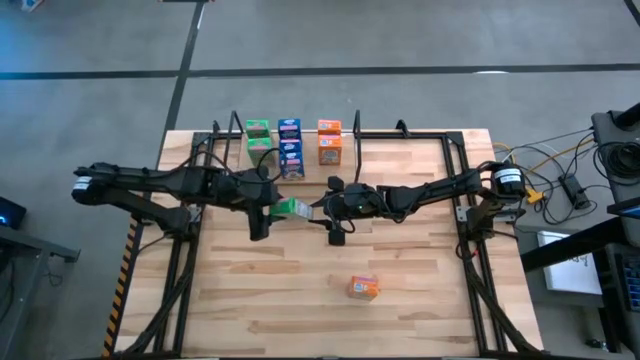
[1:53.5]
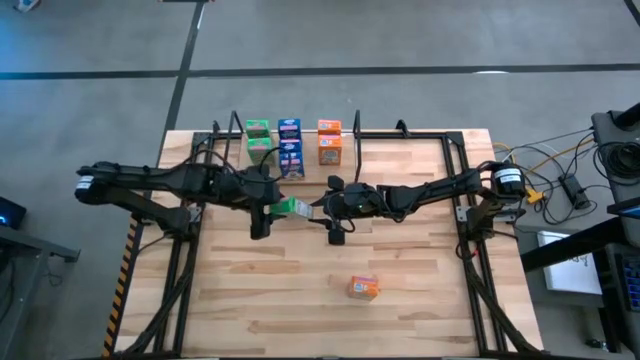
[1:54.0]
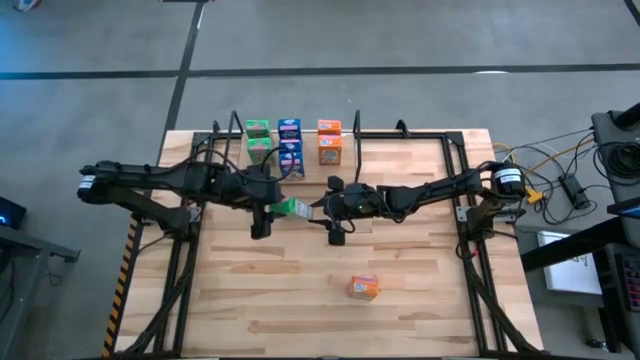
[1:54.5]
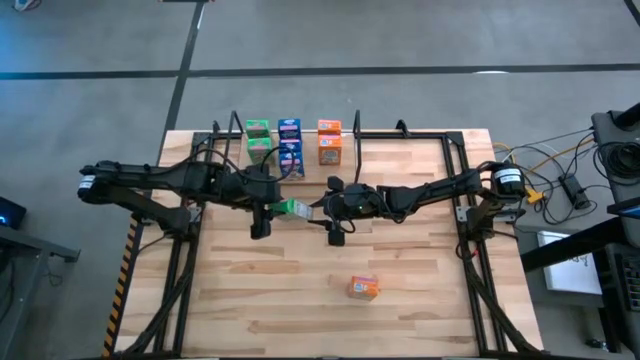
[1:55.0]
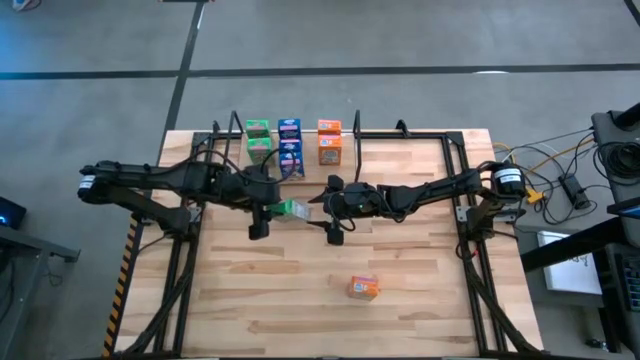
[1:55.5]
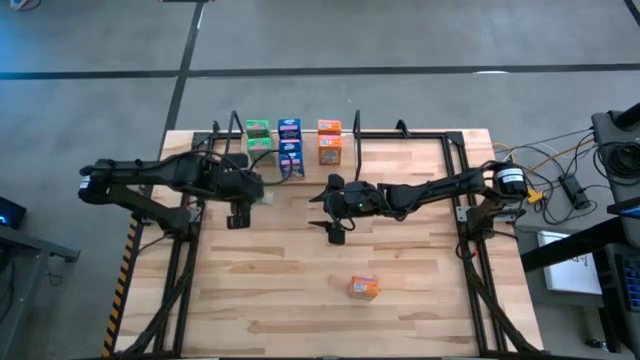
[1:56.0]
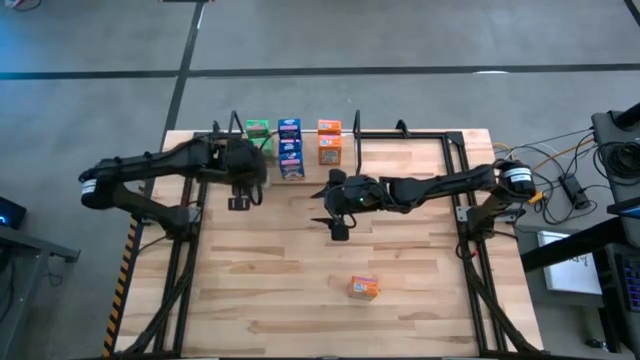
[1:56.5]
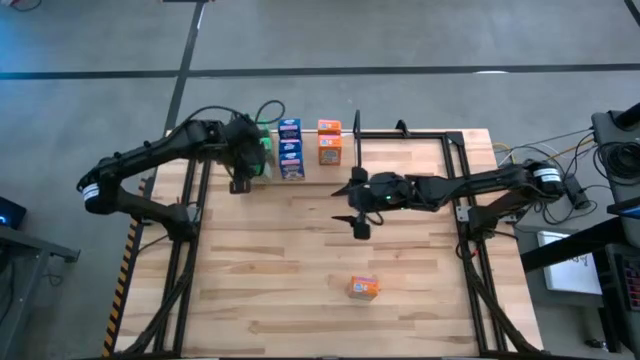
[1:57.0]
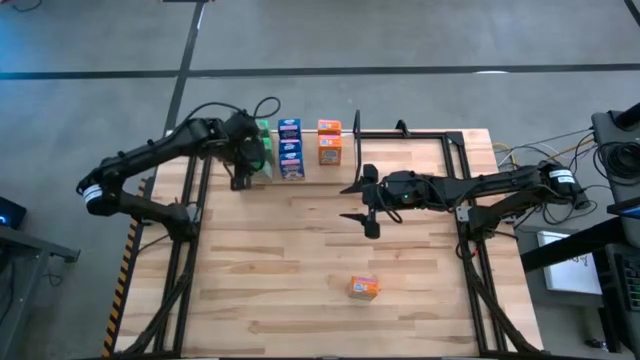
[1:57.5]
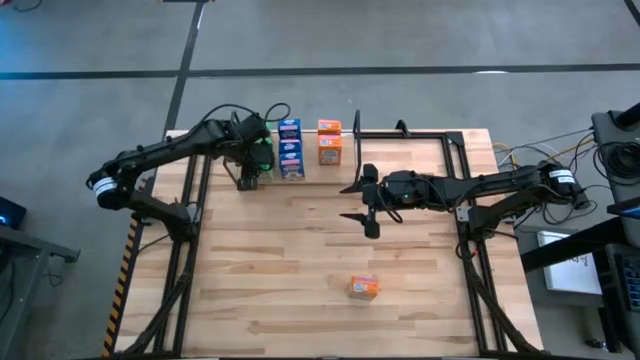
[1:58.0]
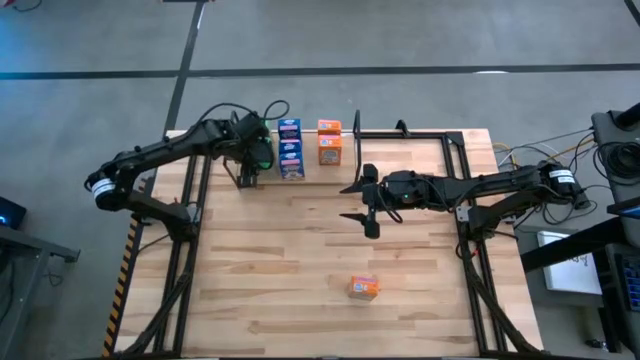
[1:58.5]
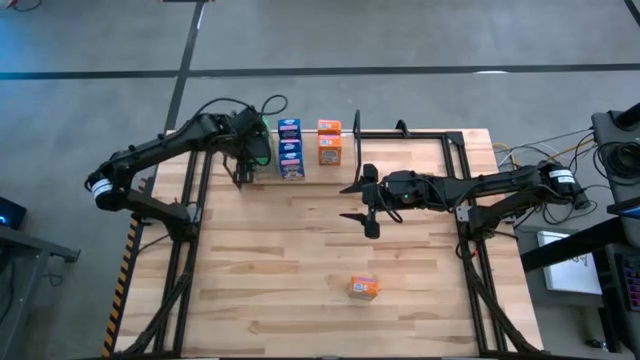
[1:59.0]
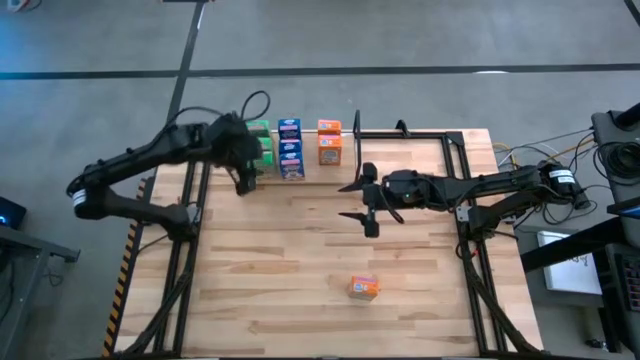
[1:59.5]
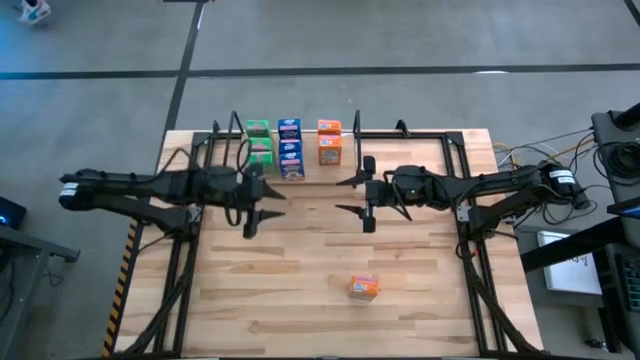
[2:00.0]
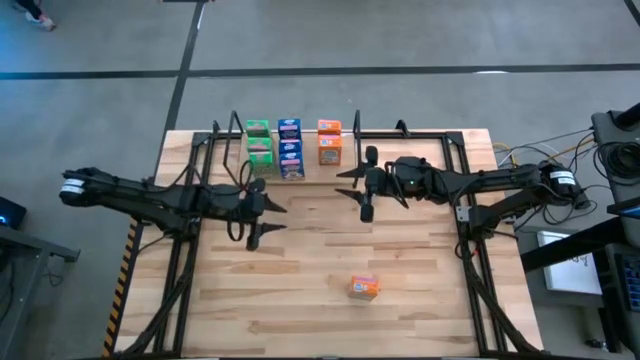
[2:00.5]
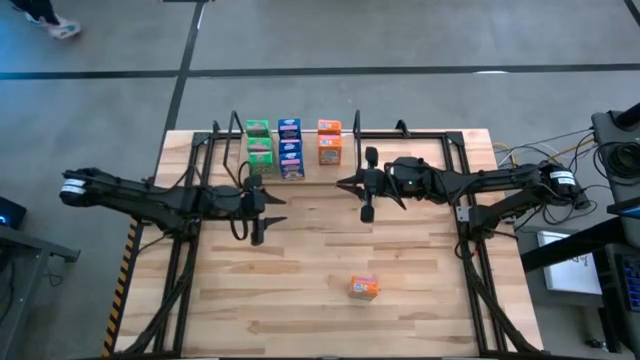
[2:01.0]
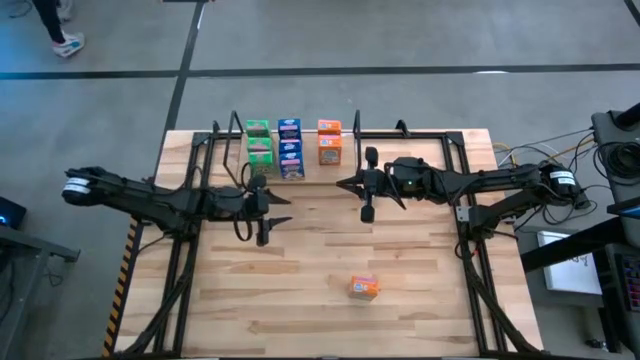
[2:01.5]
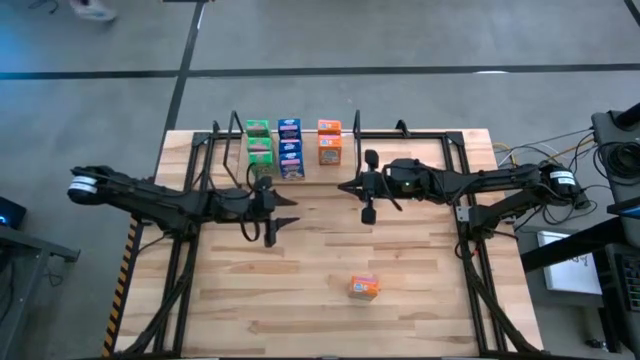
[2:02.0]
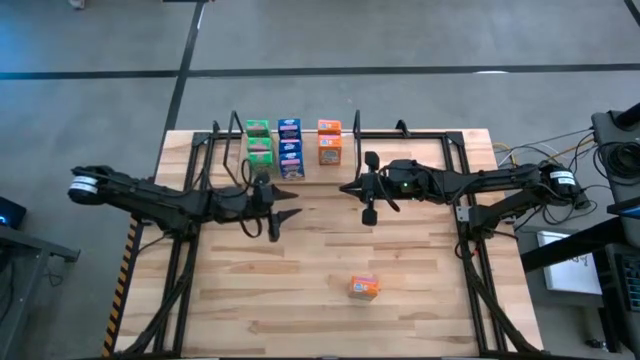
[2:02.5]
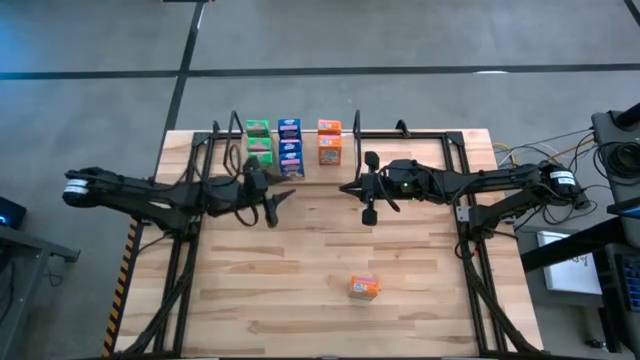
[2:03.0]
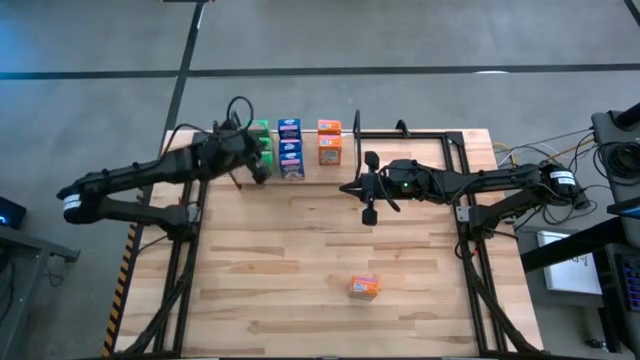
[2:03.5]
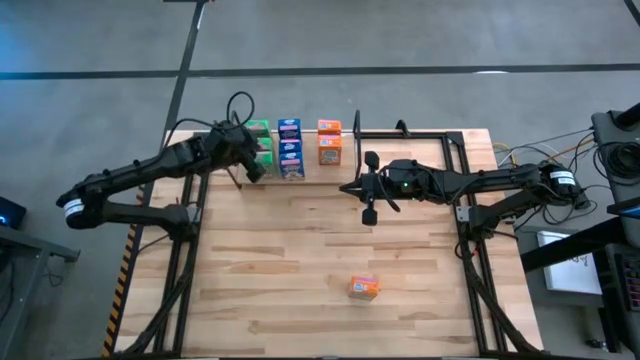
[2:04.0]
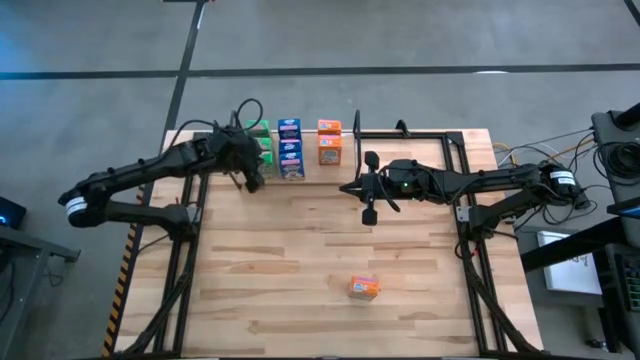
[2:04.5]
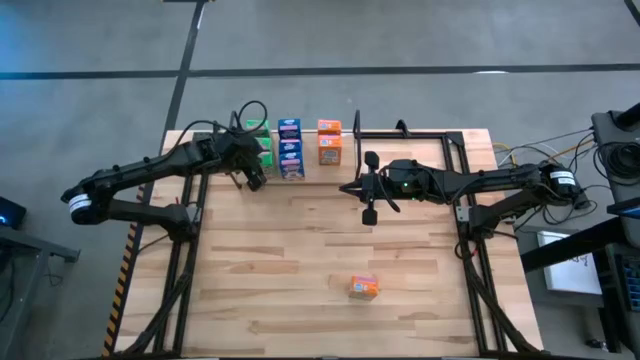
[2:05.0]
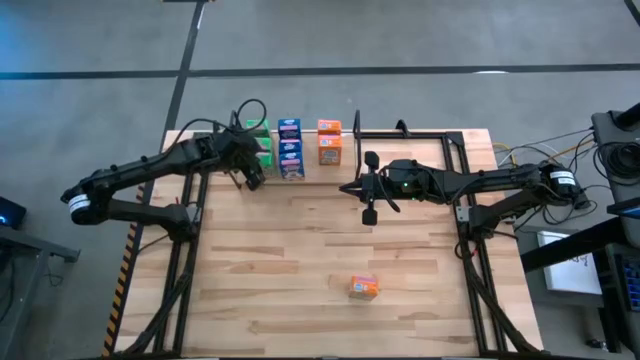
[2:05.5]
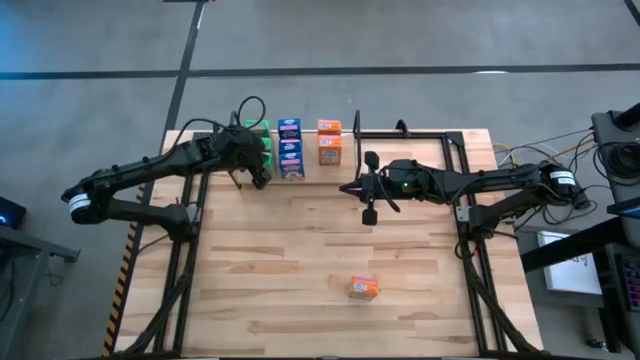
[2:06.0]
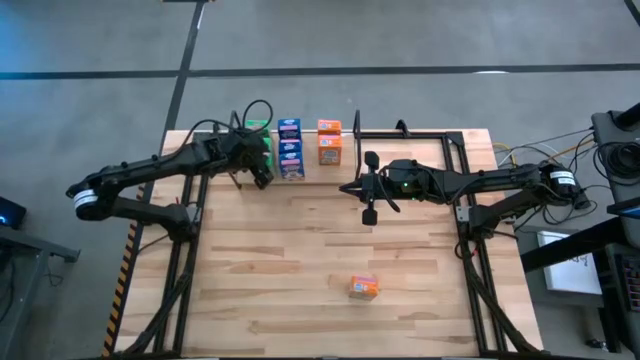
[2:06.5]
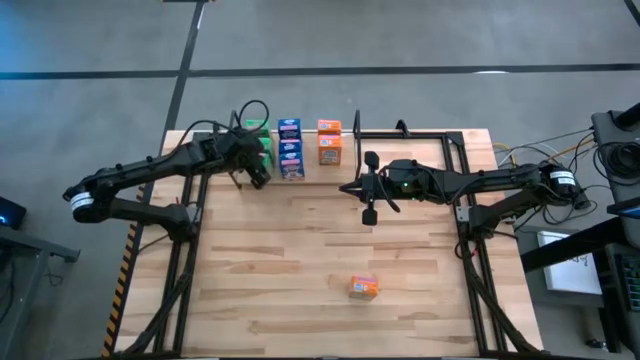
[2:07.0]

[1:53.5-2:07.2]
Task: Stack cereal on shelf
Put the green cereal box on the shelf aligned with the other green cereal box

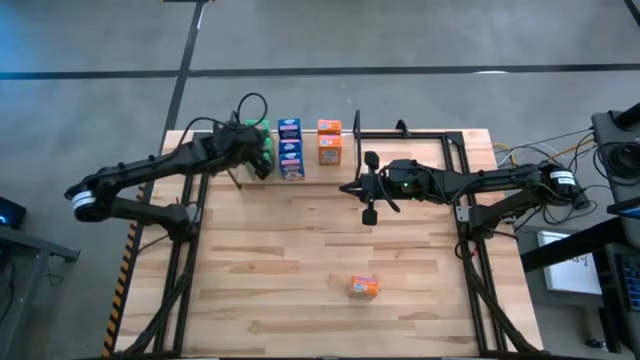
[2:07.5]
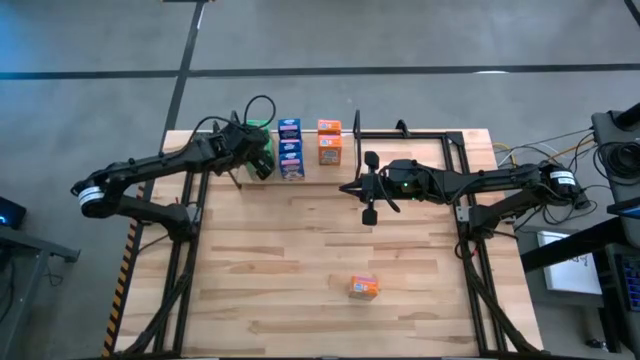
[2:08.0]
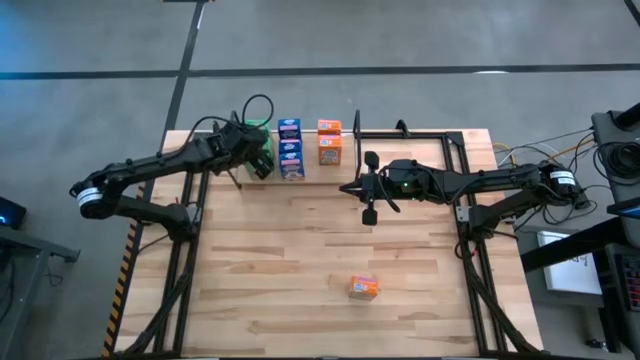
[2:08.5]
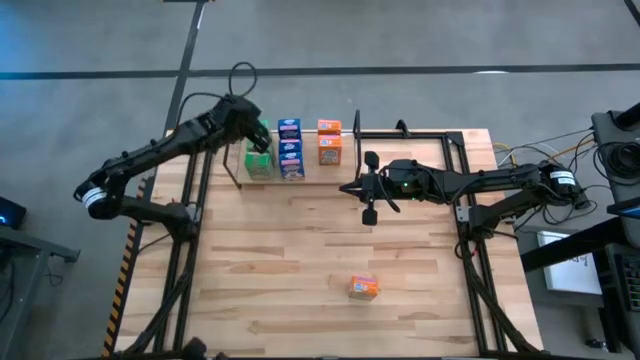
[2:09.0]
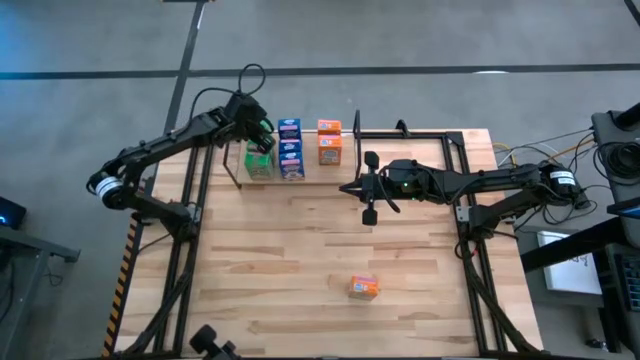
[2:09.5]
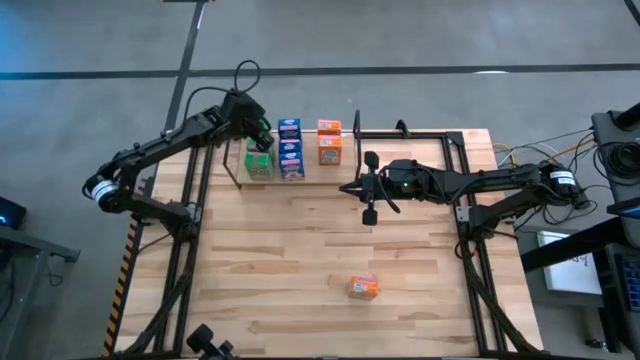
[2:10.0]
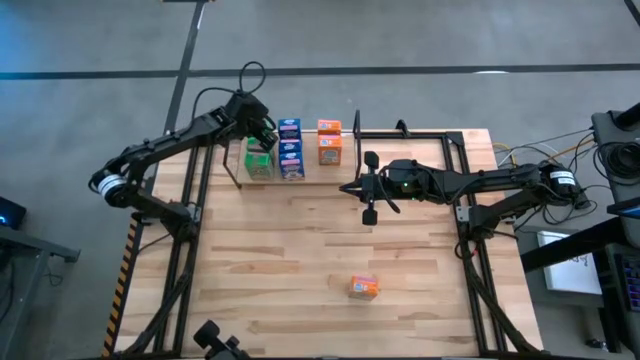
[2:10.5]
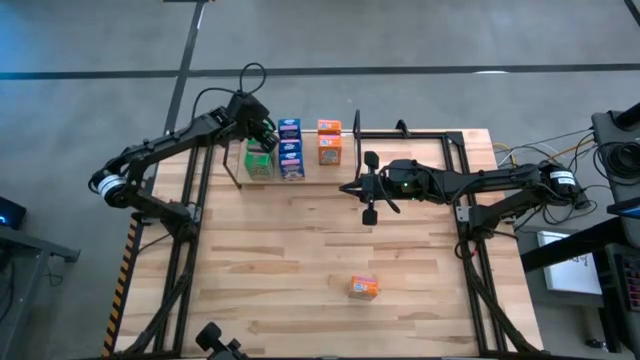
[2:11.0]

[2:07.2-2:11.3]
Adjust the green cereal boxes on the shelf

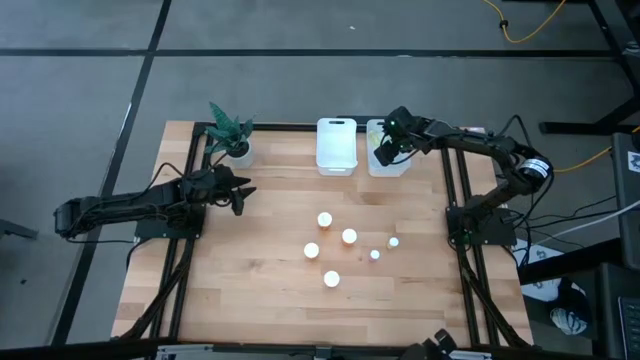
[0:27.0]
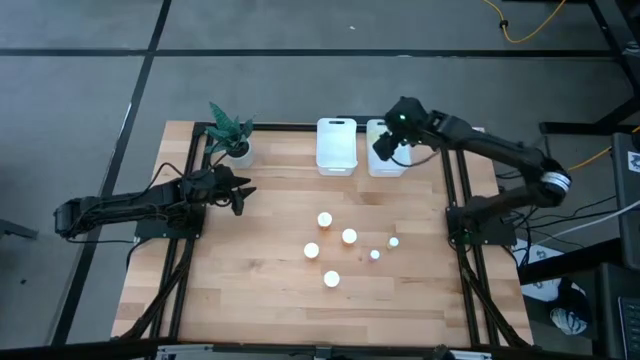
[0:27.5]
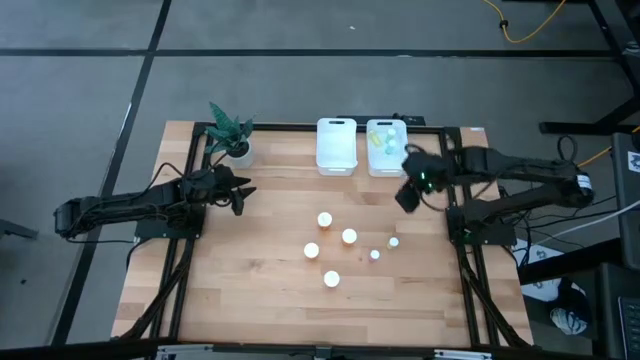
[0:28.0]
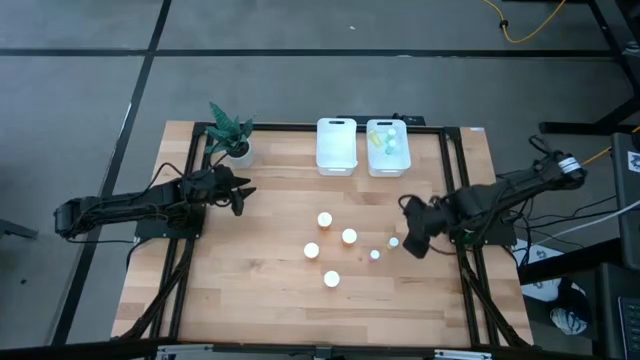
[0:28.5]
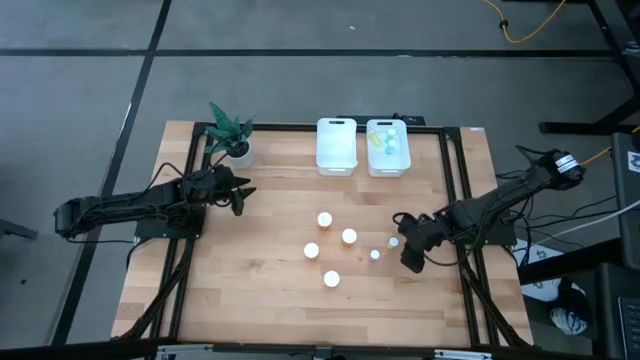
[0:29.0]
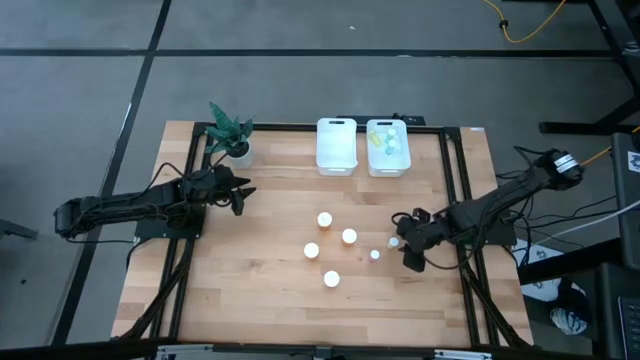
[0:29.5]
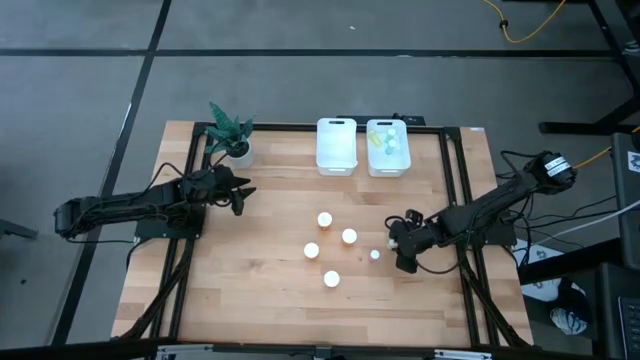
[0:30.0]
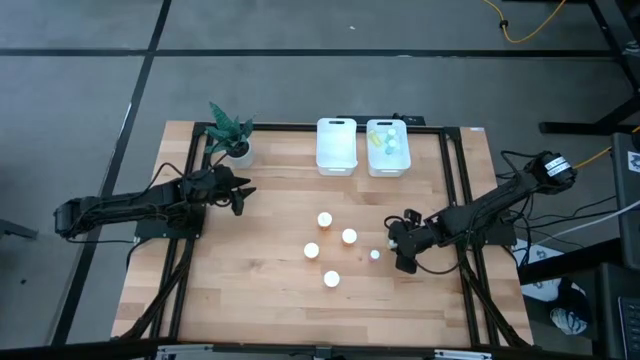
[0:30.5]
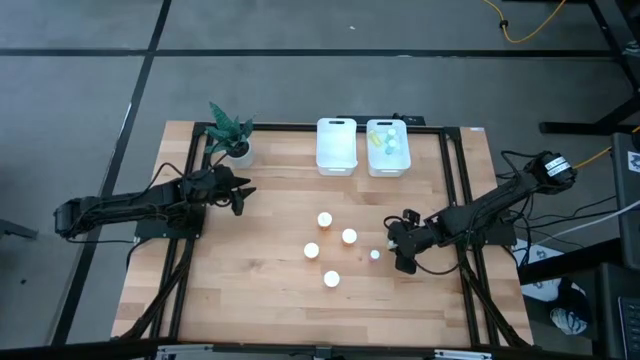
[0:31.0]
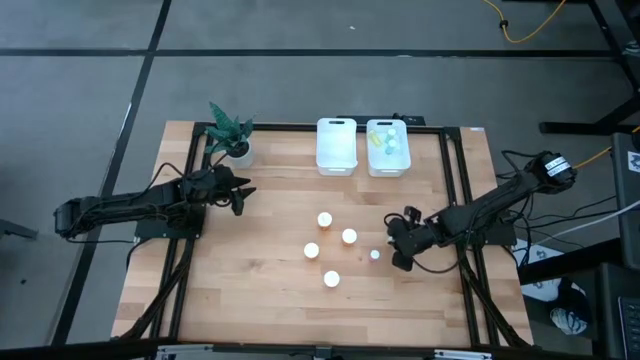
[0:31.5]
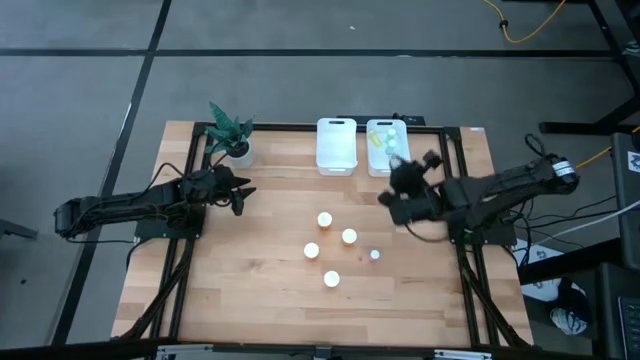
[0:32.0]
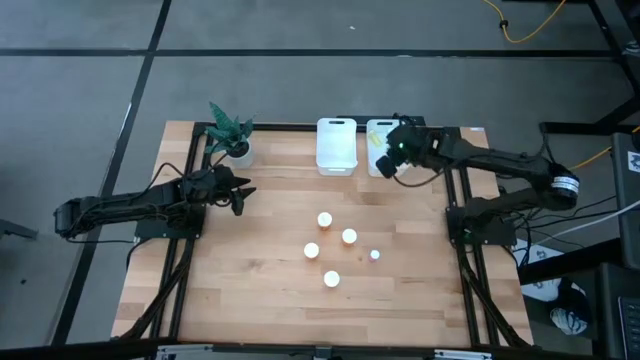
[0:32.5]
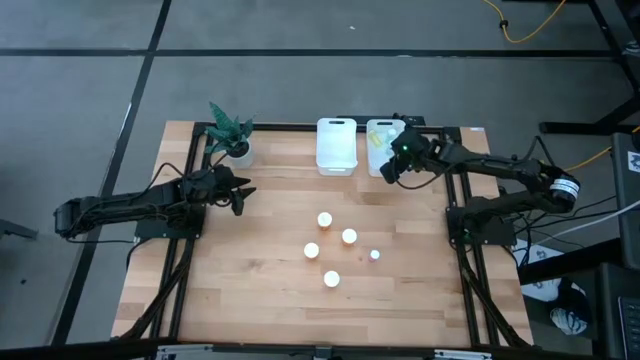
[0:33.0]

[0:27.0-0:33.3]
Task: Pick and place medicine bottles into bin by pill shape (circle, oval)
Put the small yellow pill bottle into the right white bin
